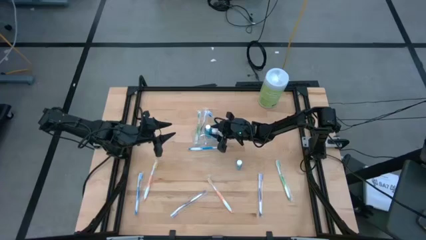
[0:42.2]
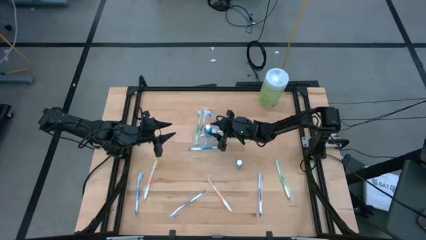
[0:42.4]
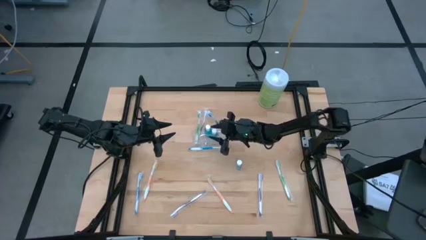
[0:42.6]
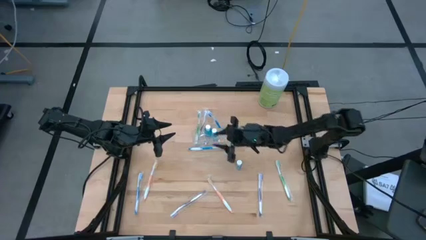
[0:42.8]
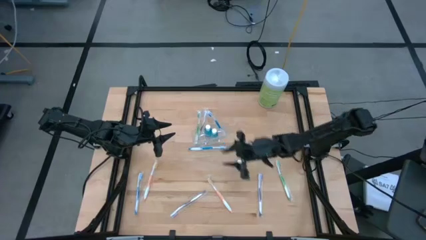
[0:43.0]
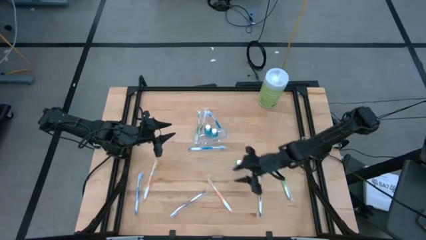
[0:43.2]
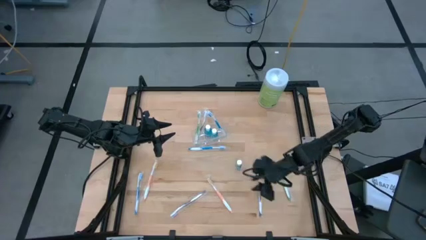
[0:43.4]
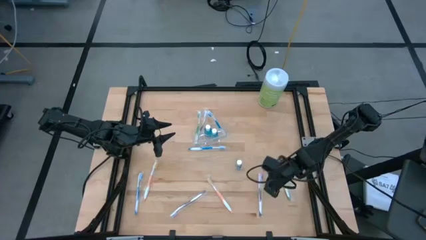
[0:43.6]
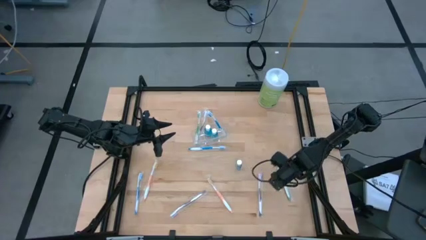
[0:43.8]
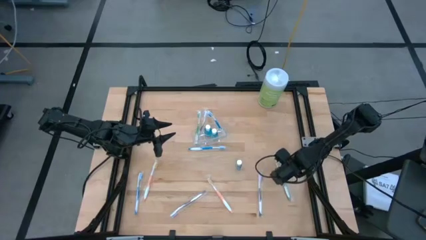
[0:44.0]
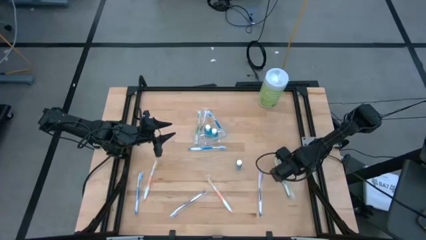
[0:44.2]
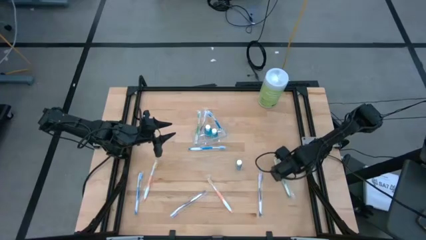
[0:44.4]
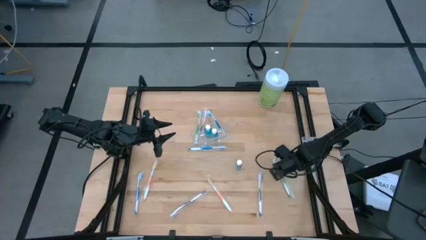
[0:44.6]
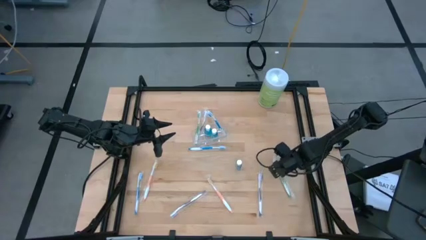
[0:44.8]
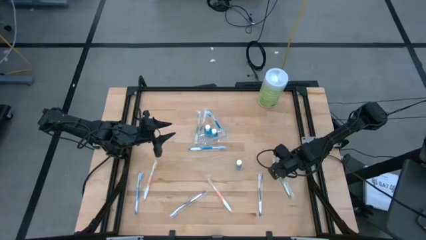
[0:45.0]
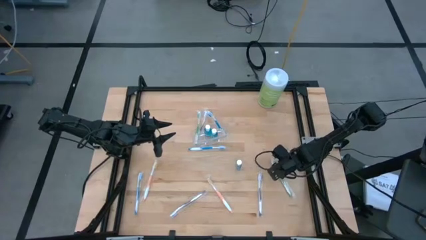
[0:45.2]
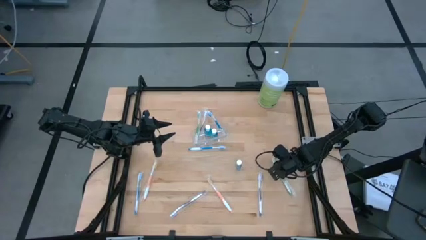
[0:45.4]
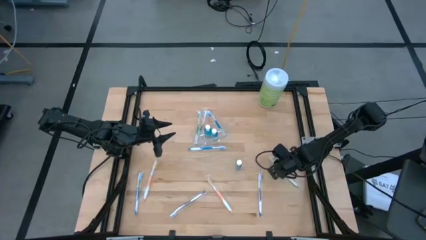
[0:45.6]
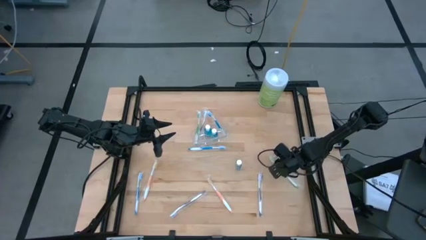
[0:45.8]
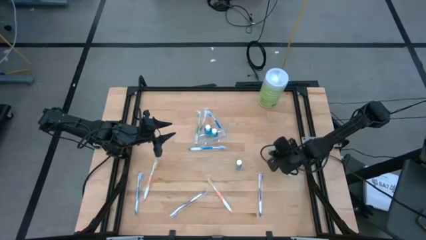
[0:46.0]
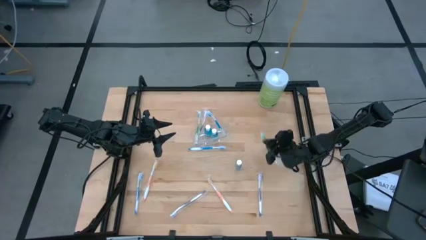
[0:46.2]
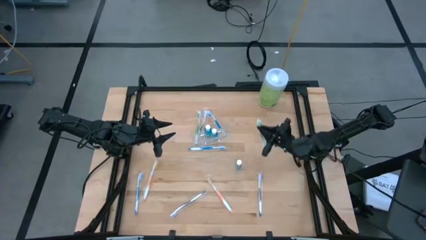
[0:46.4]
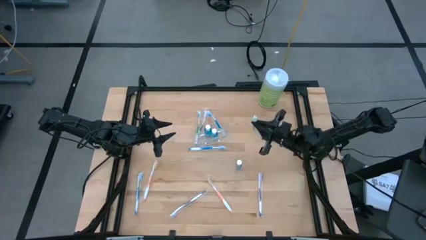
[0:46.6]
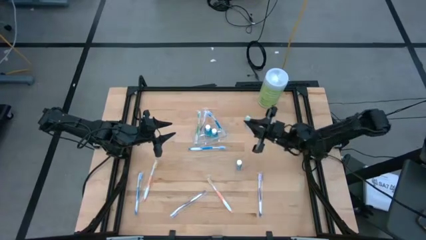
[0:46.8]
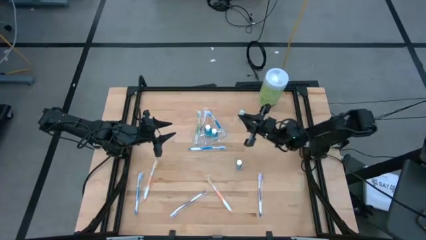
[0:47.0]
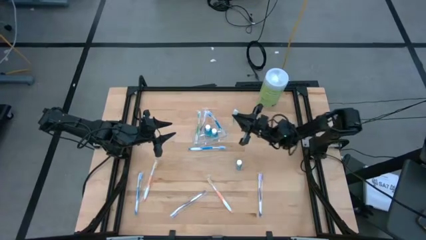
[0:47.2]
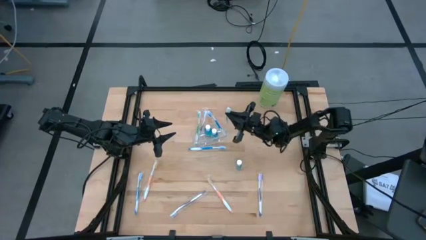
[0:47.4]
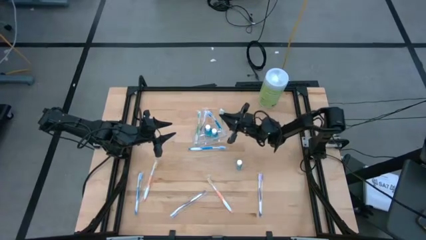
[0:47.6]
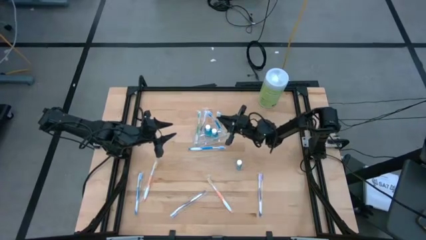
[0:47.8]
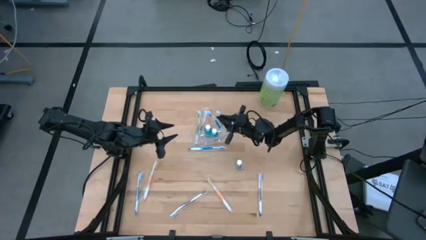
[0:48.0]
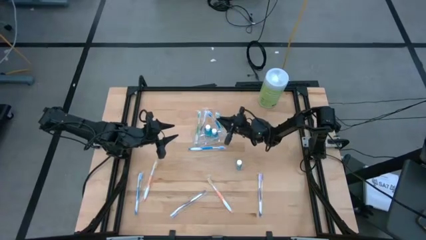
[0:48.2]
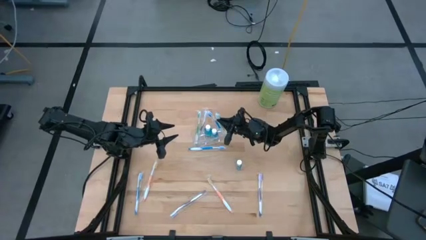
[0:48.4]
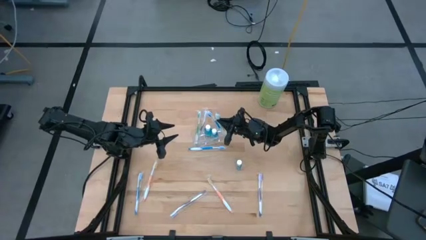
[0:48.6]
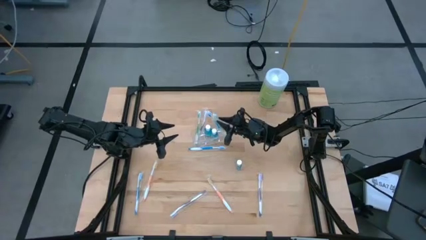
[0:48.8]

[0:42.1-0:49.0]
Task: Pick & Place toothbrushing station
Put the green toothbrush into the transparent organizer

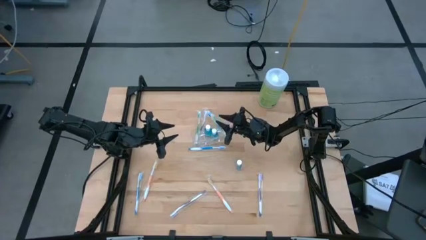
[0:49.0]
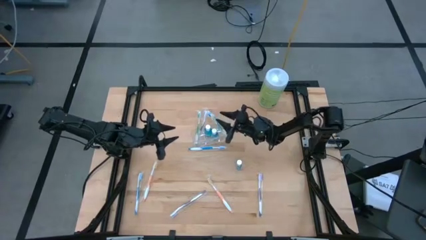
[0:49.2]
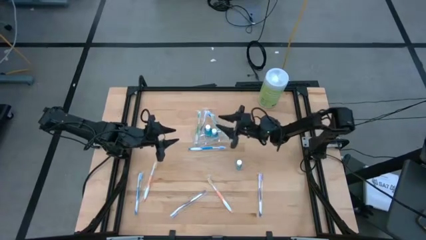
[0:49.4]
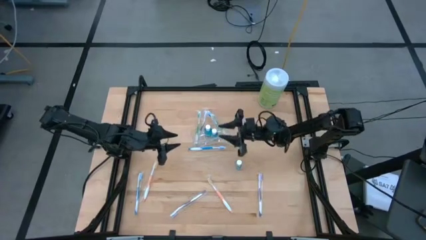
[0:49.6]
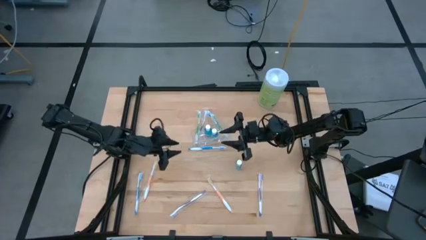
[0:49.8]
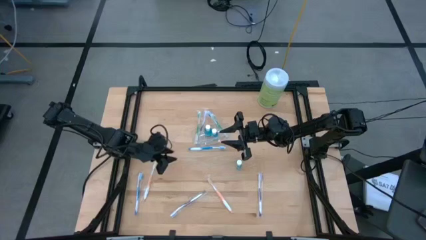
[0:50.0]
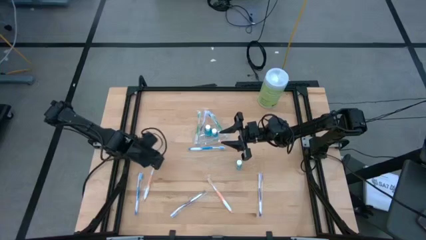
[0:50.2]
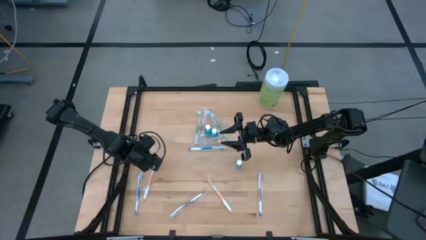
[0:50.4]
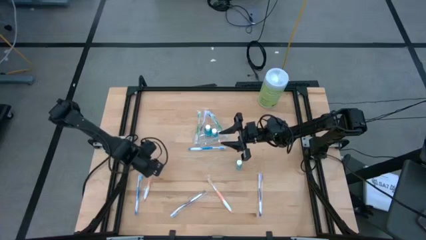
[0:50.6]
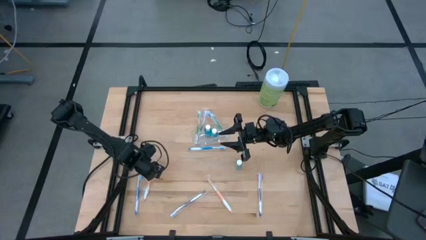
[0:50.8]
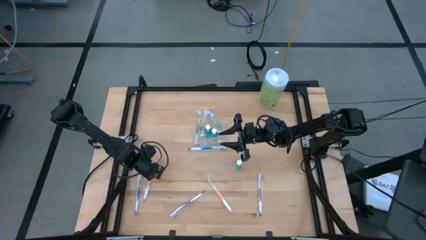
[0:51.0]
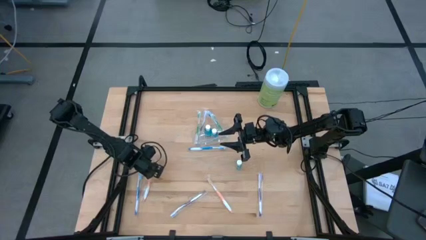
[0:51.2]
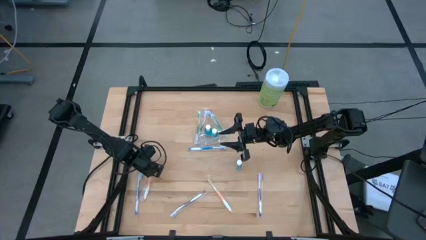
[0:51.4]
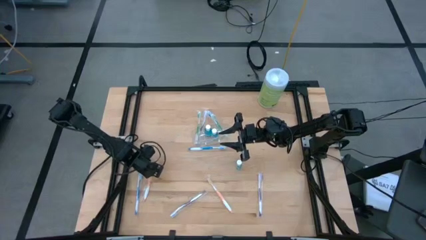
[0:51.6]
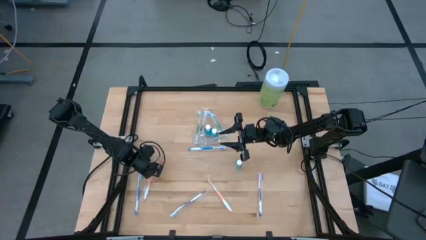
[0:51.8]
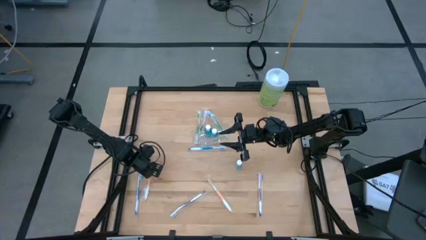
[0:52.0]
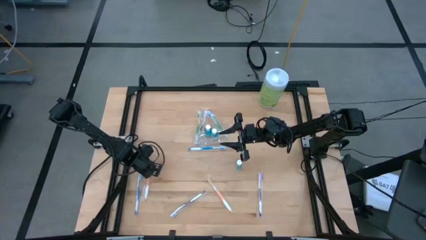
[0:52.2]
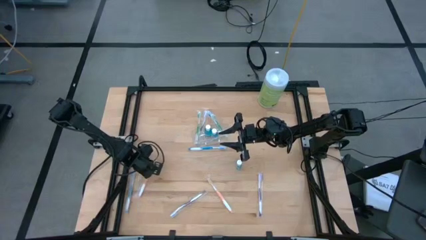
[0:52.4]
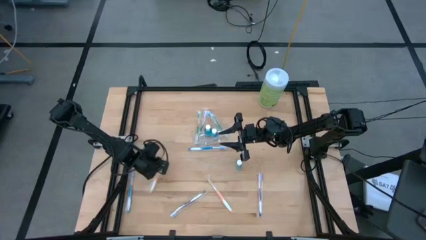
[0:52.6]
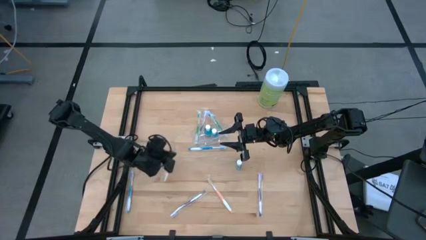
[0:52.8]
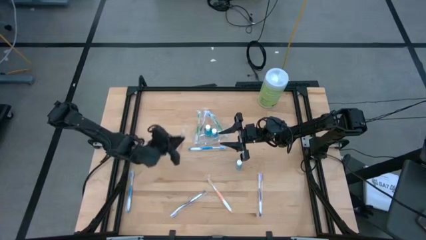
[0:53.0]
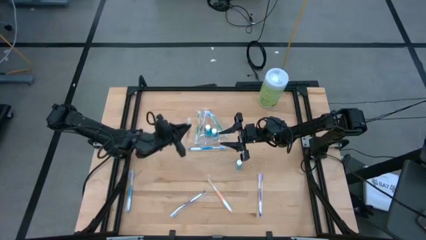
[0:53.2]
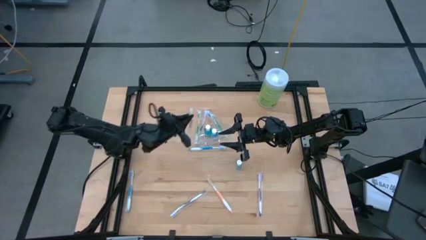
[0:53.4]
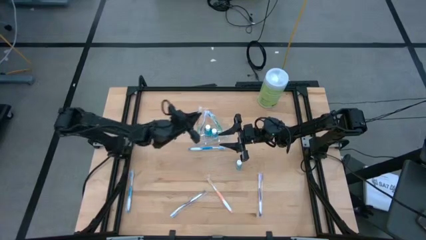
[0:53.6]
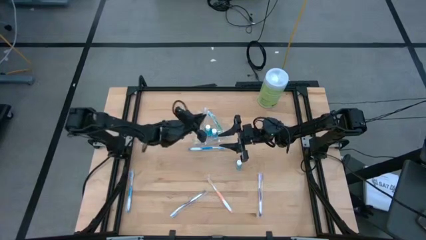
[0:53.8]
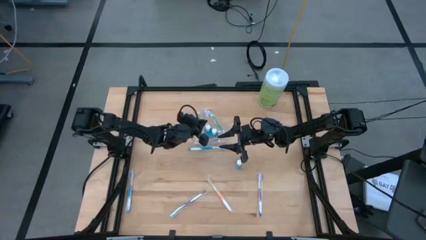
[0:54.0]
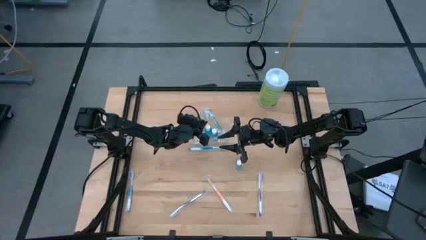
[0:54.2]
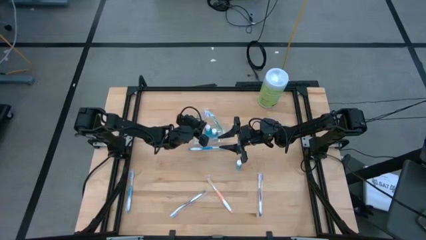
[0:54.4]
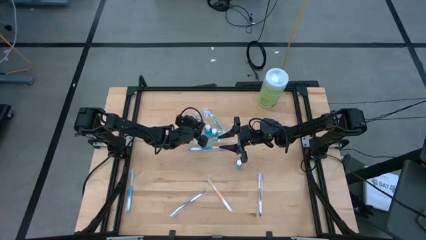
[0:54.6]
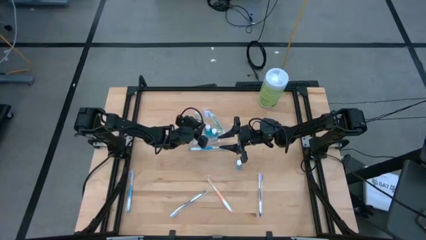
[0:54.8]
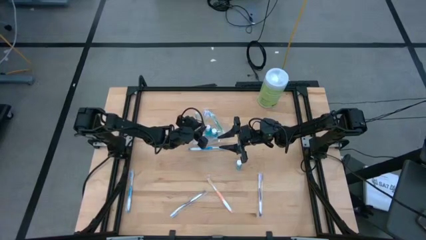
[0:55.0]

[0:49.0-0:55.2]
Put the left orange toothbrush into the transparent organizer

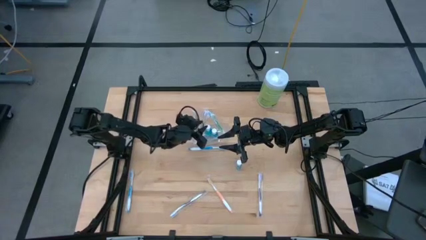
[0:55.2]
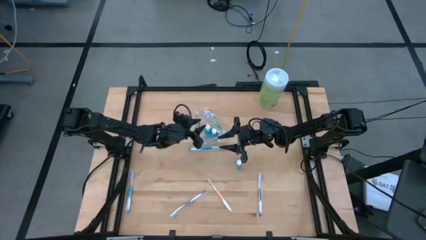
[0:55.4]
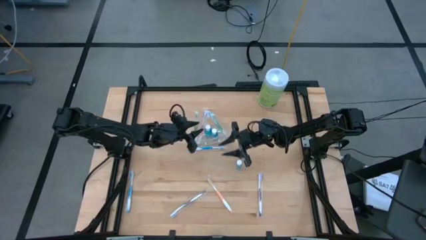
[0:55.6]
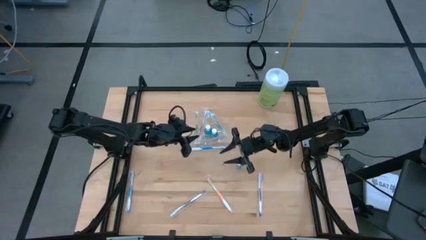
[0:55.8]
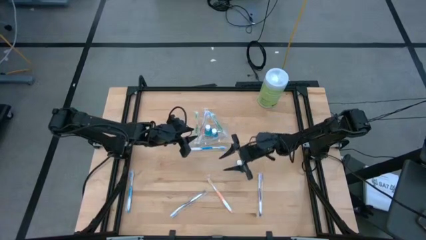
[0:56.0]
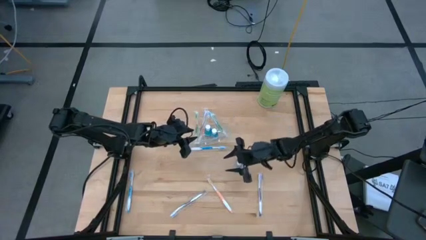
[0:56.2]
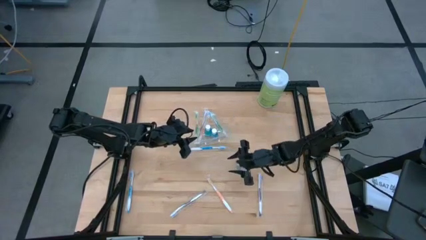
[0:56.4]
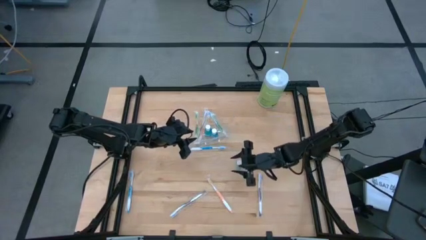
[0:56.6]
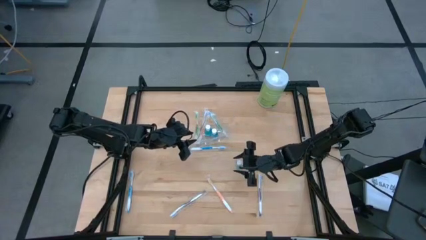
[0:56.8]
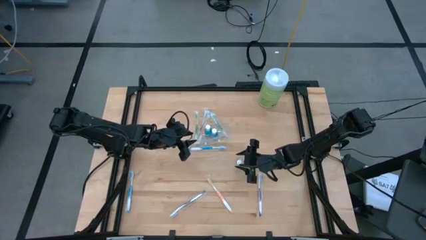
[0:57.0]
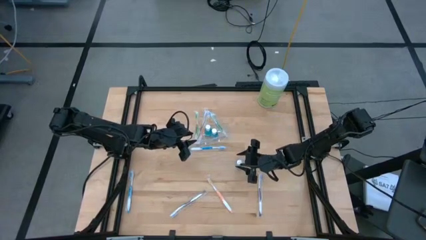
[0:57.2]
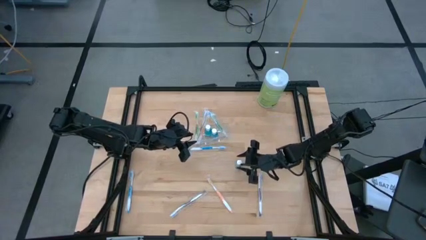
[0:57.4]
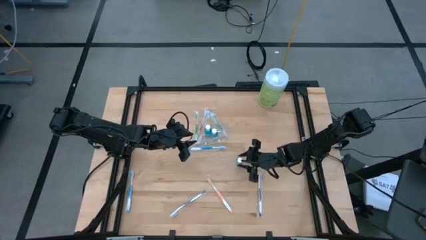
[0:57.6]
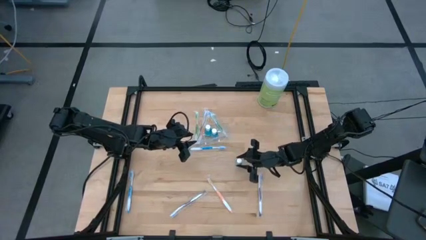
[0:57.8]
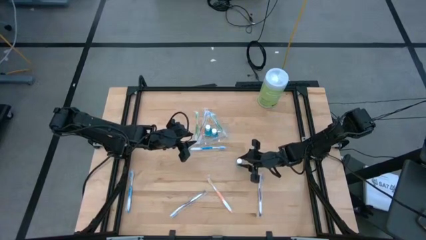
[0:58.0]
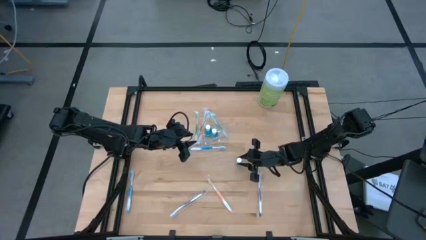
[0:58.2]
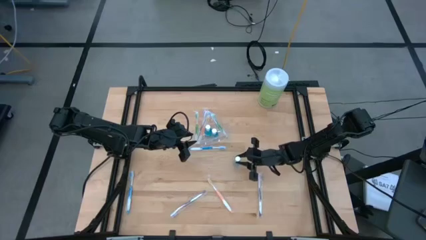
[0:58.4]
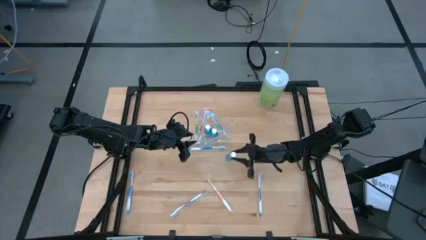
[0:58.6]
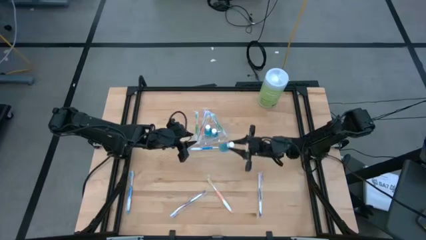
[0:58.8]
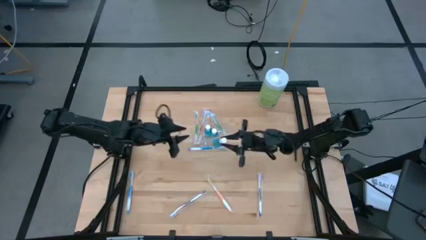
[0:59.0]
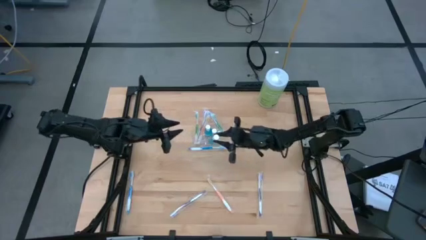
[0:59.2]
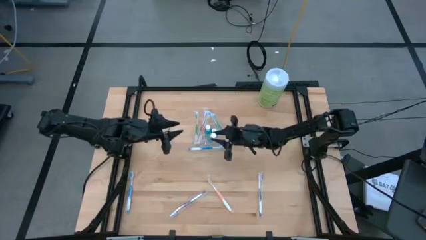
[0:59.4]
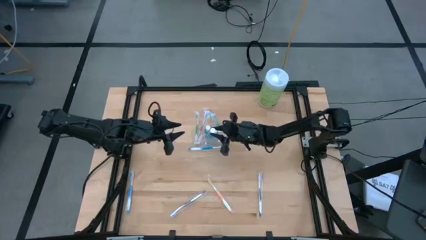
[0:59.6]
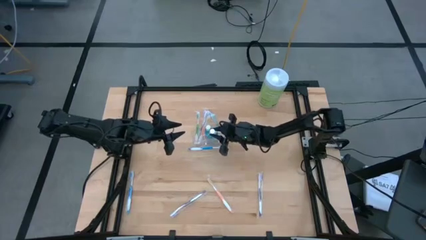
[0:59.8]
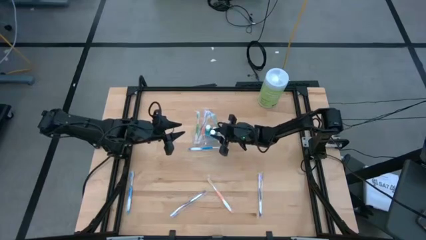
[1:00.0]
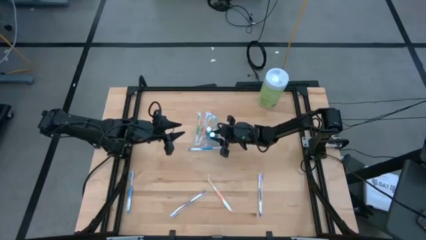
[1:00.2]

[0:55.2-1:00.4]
Put the mouthwash into the transparent organizer
